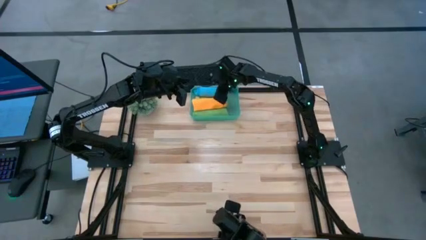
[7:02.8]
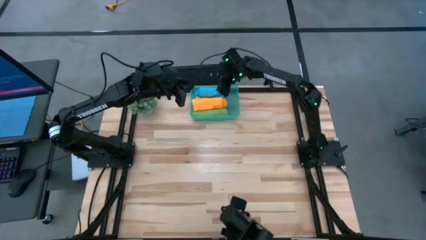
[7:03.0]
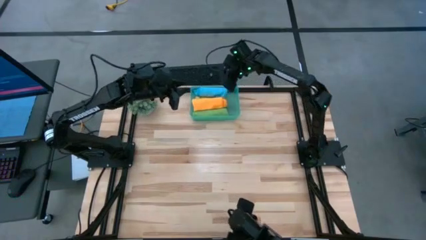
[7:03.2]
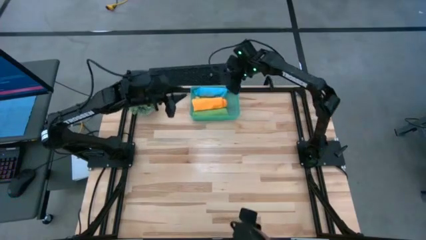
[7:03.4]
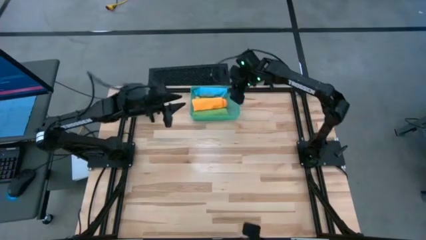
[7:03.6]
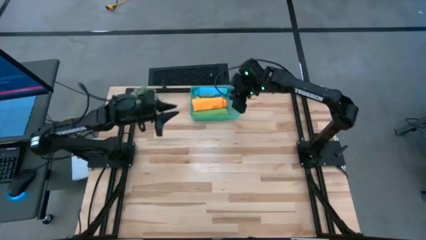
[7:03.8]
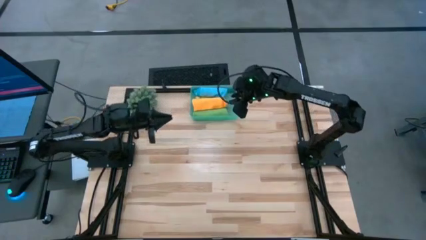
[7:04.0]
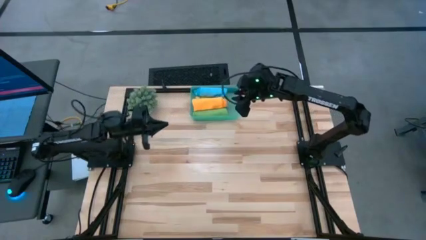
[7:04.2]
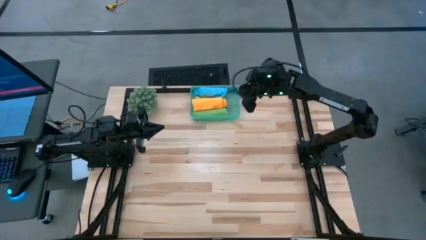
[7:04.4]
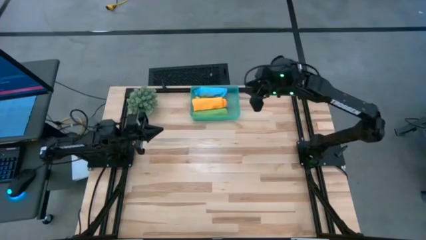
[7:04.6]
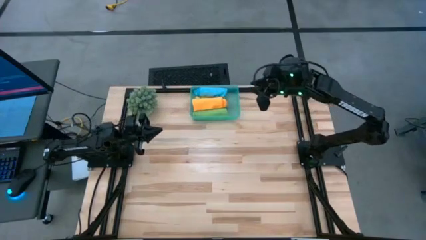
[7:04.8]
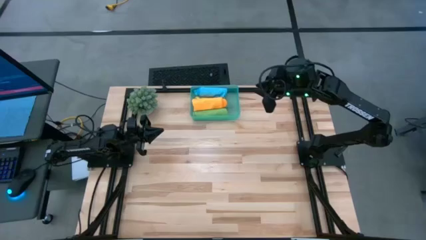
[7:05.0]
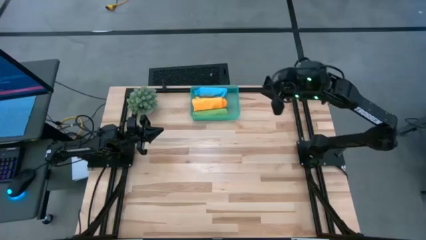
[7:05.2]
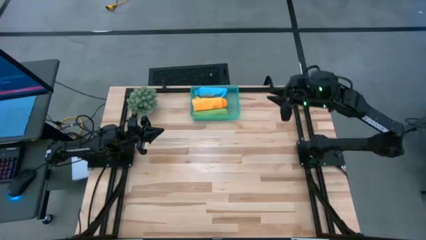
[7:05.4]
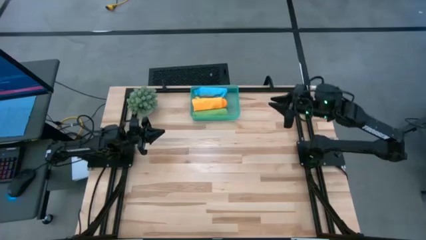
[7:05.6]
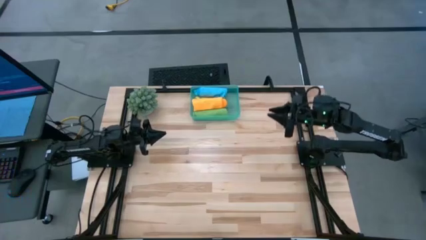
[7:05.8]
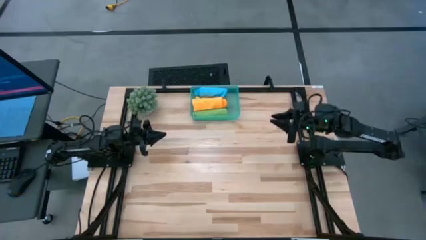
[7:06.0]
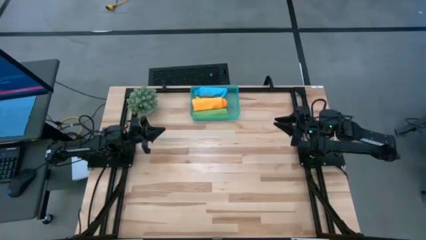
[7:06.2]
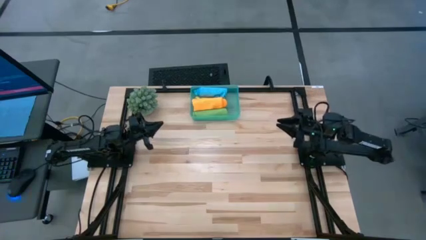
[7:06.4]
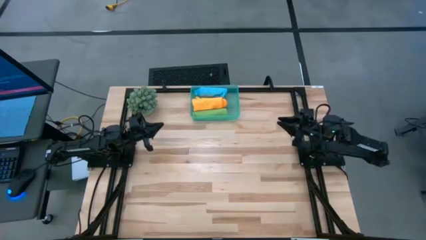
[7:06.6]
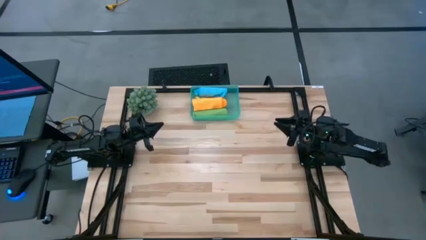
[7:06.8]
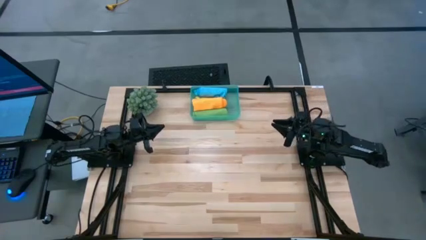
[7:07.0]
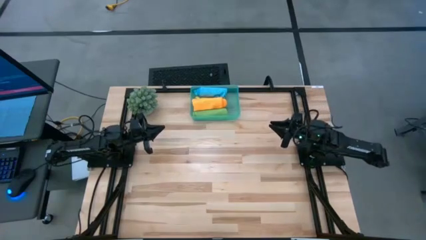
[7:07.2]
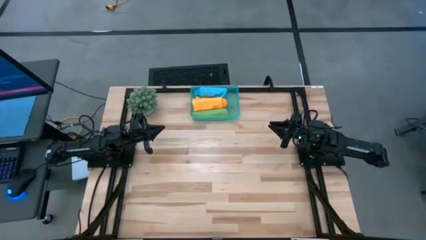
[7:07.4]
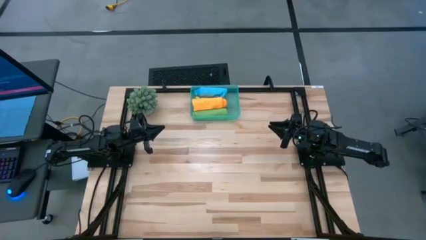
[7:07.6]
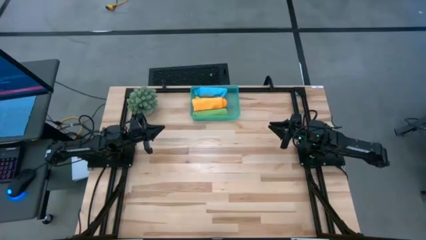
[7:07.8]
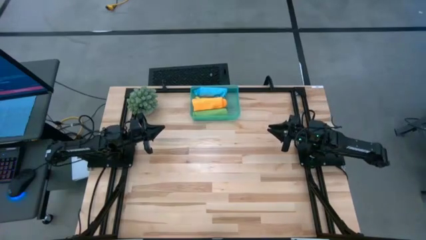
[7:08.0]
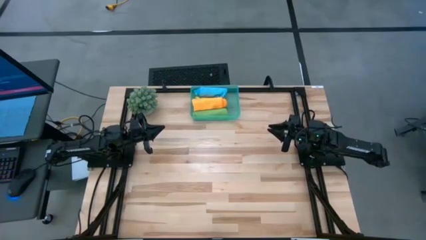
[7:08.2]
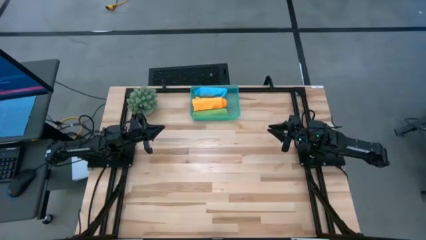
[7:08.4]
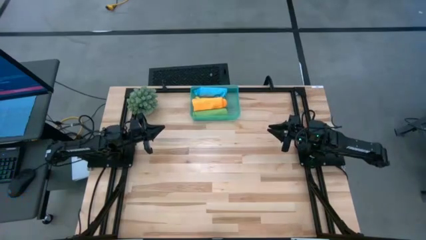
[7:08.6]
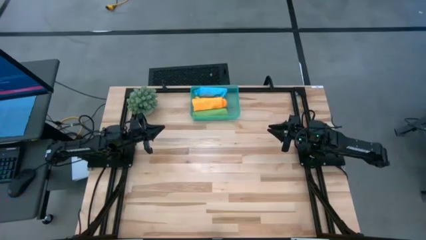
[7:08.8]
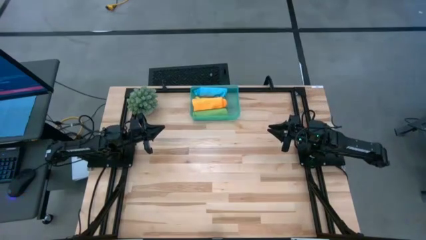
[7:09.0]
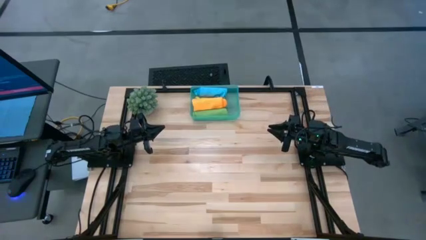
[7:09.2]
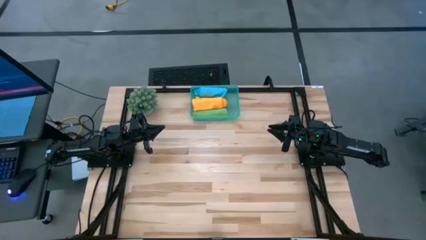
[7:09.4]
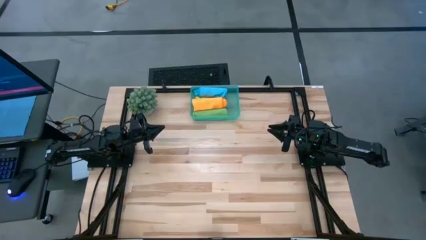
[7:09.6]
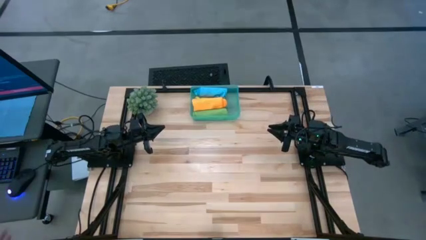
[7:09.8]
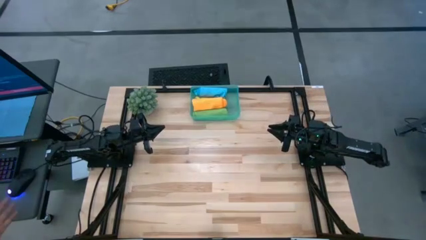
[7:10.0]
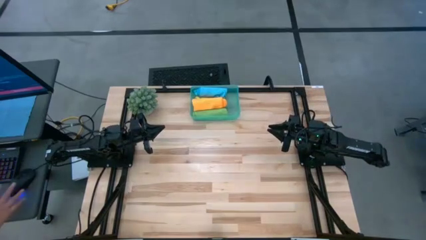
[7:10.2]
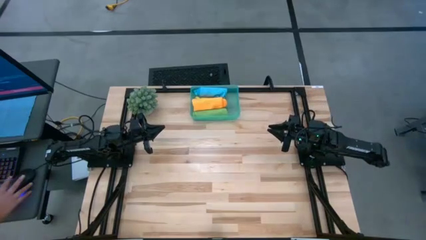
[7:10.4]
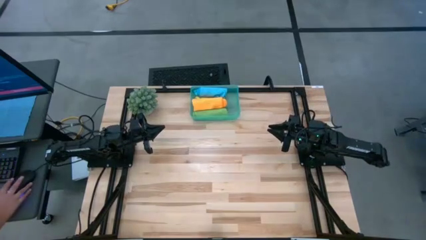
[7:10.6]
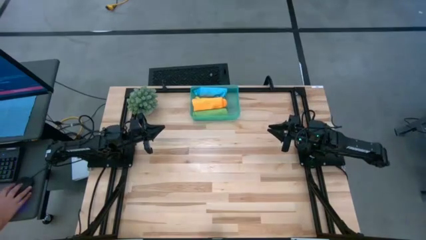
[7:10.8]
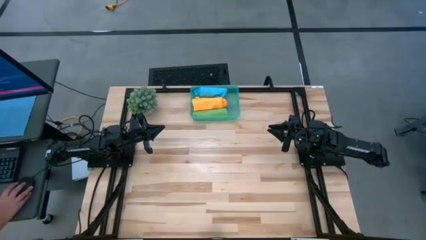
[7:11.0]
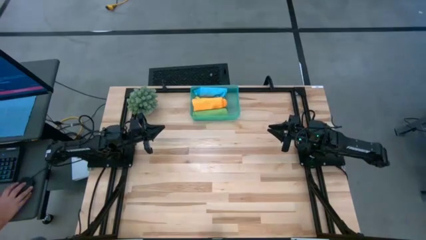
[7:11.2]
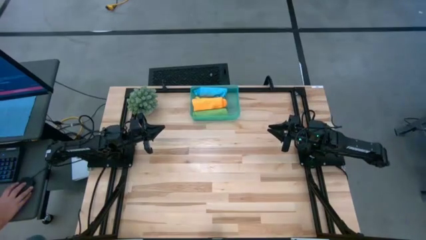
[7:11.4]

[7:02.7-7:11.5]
Task: Roll microfiber towels into tight, uniform cylinder then place into a basket
Return to Home Position

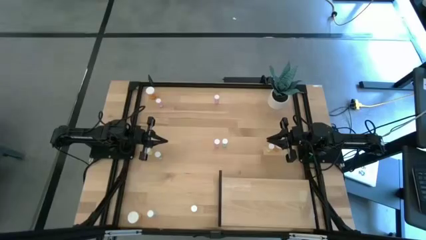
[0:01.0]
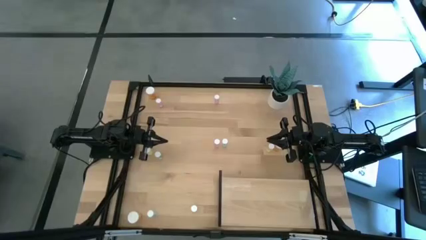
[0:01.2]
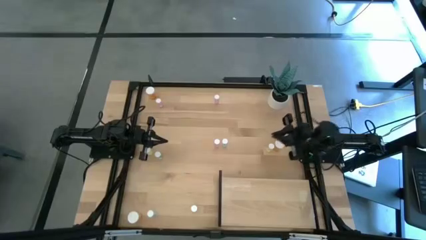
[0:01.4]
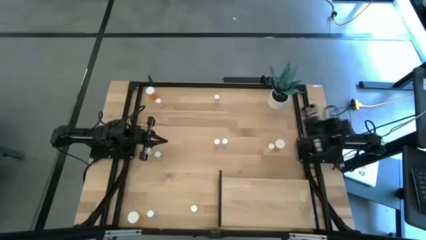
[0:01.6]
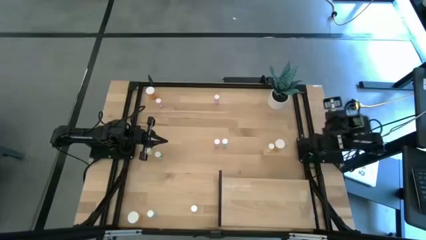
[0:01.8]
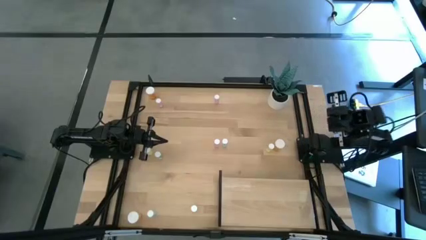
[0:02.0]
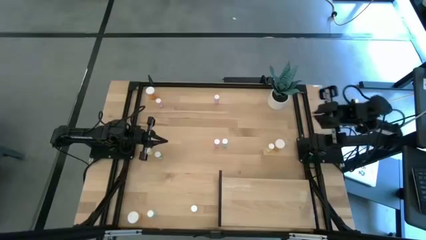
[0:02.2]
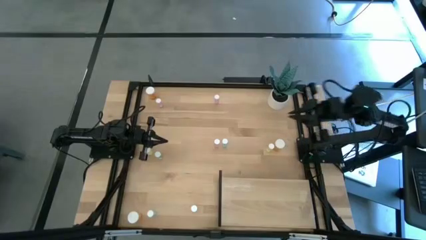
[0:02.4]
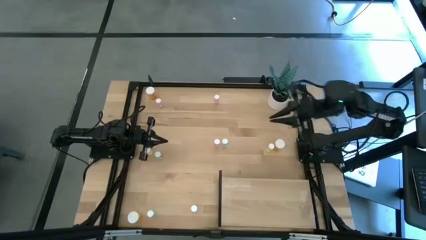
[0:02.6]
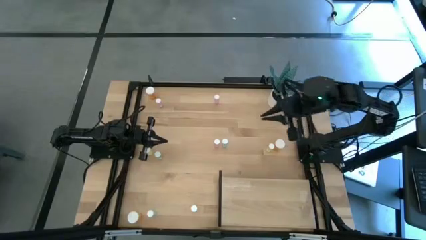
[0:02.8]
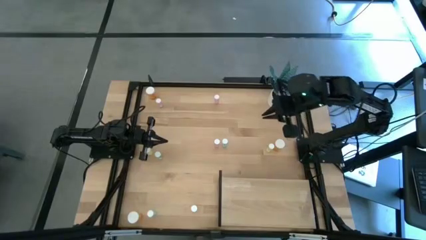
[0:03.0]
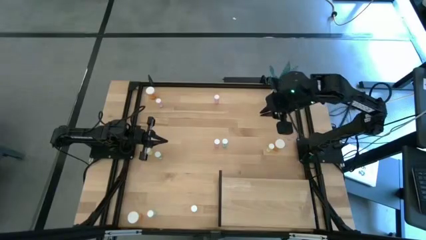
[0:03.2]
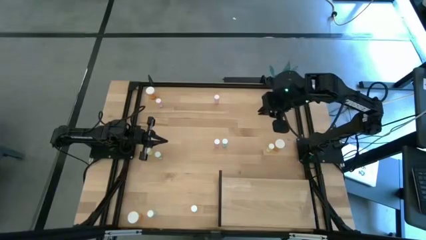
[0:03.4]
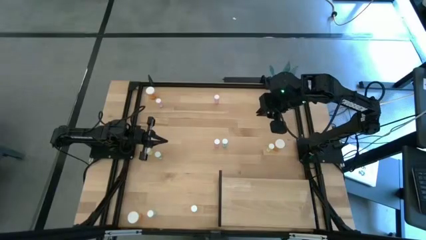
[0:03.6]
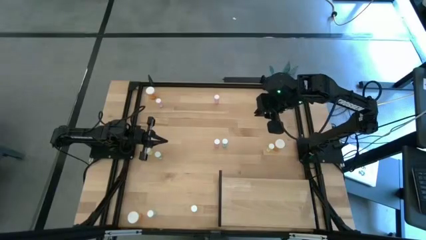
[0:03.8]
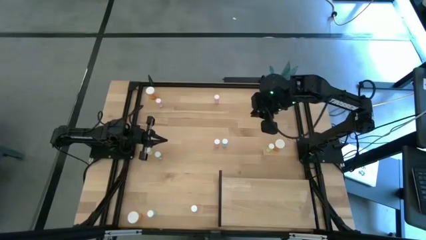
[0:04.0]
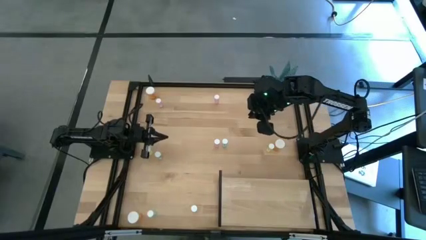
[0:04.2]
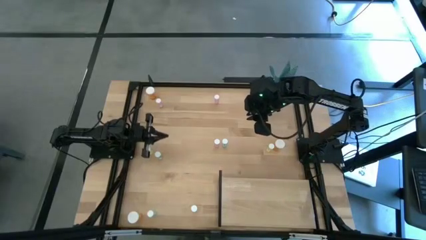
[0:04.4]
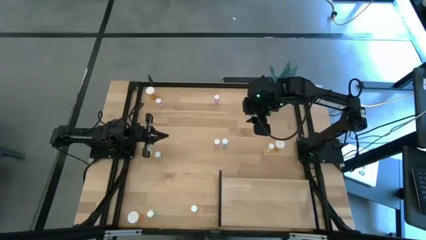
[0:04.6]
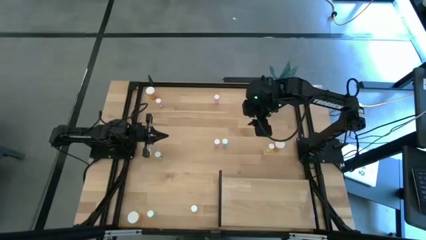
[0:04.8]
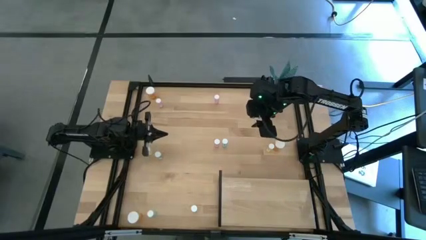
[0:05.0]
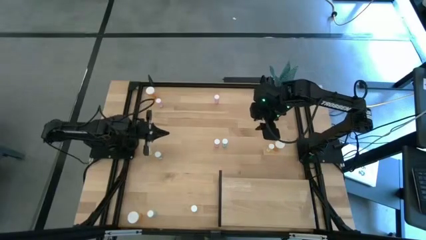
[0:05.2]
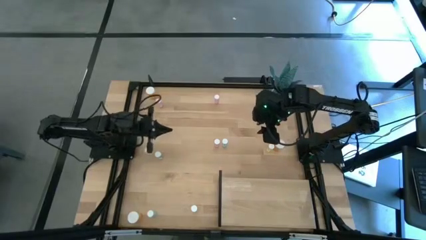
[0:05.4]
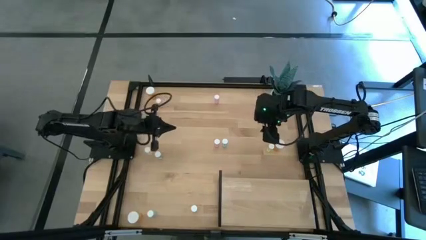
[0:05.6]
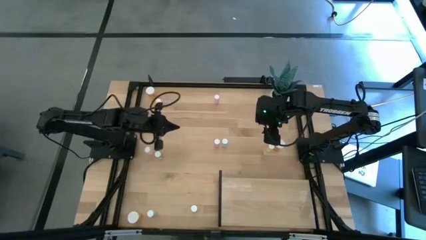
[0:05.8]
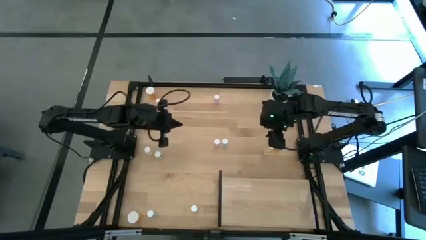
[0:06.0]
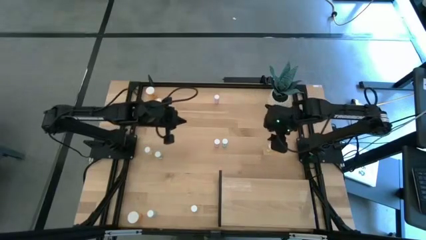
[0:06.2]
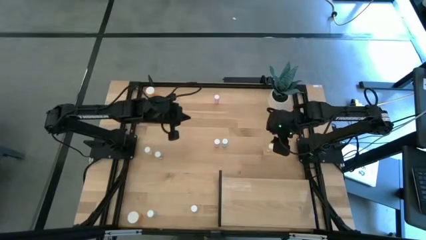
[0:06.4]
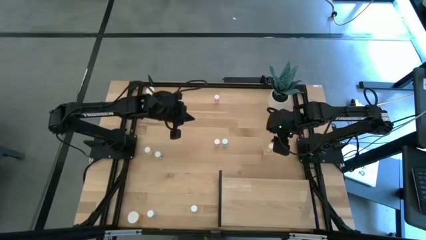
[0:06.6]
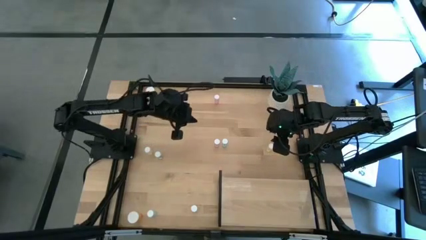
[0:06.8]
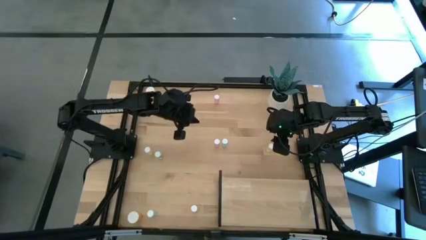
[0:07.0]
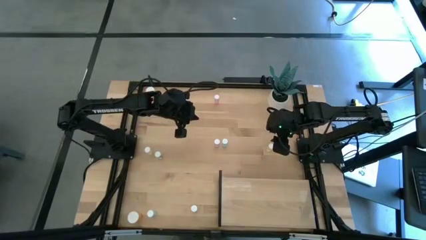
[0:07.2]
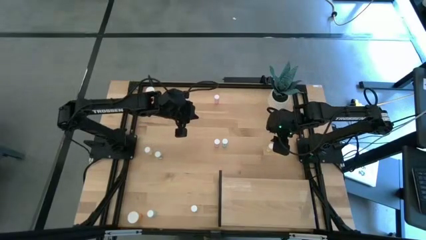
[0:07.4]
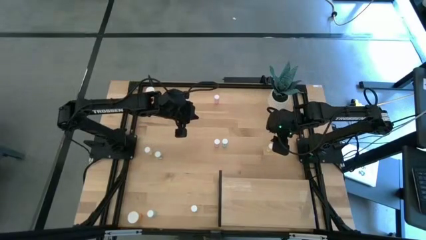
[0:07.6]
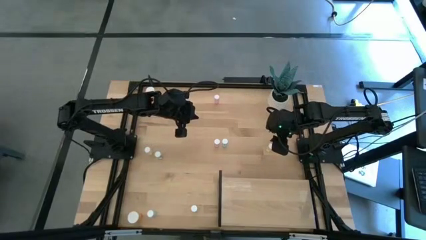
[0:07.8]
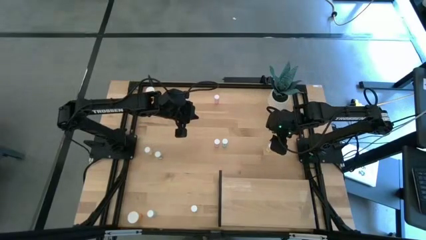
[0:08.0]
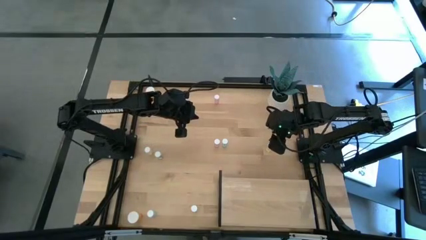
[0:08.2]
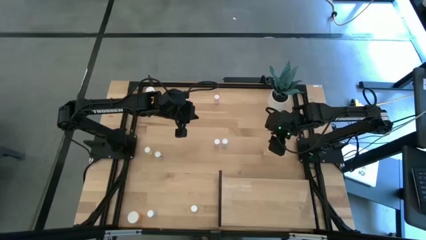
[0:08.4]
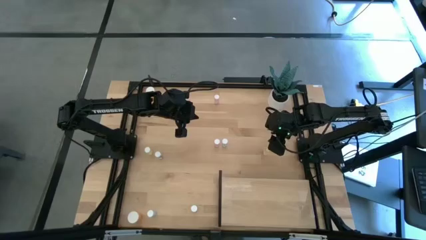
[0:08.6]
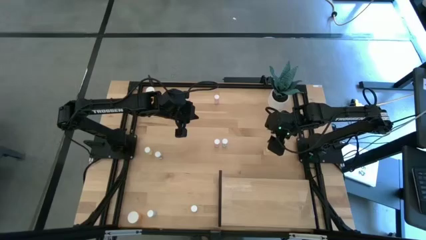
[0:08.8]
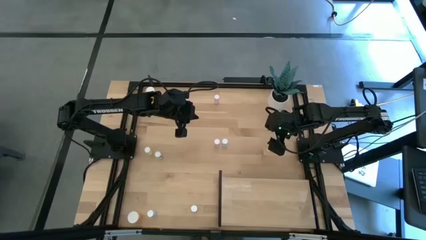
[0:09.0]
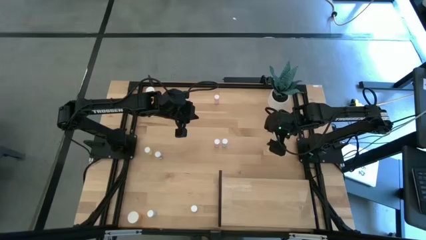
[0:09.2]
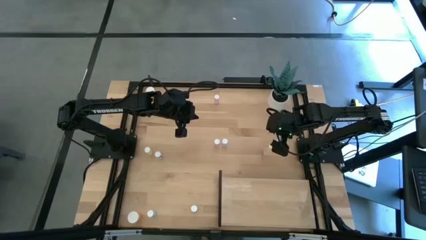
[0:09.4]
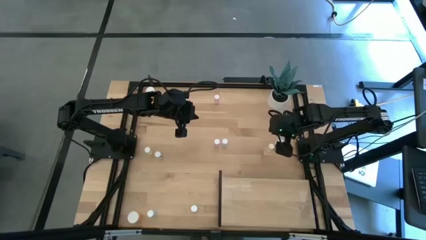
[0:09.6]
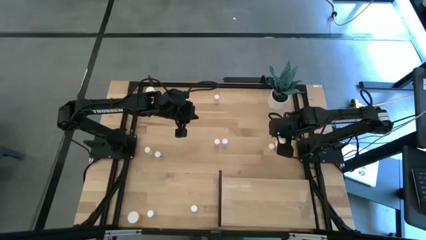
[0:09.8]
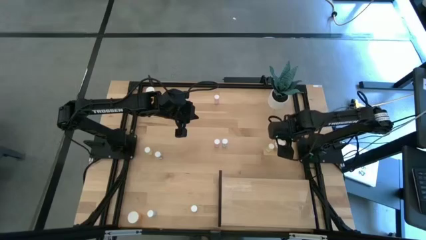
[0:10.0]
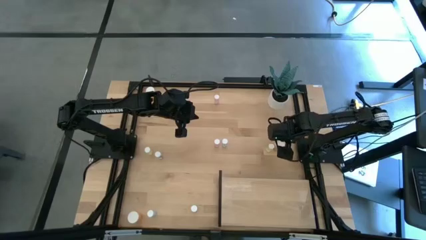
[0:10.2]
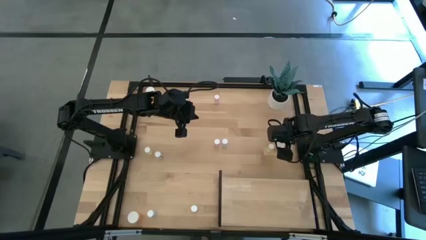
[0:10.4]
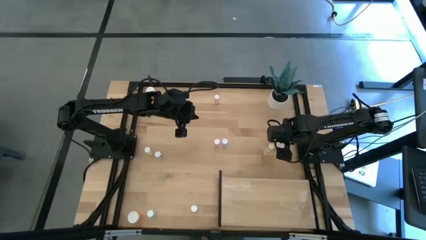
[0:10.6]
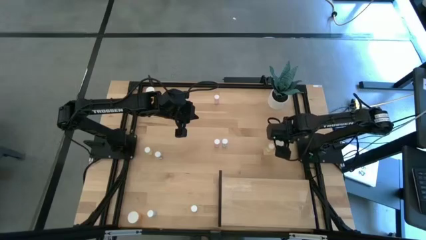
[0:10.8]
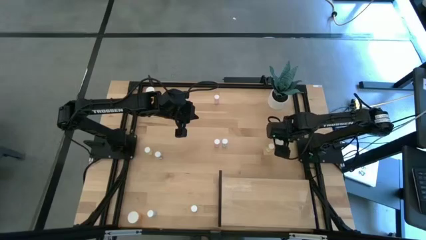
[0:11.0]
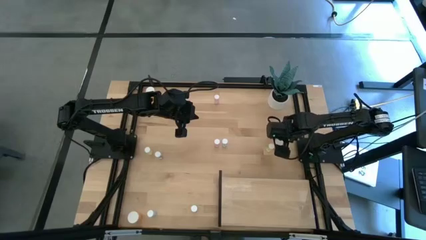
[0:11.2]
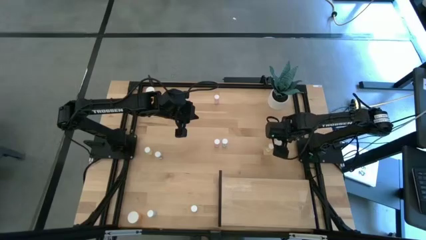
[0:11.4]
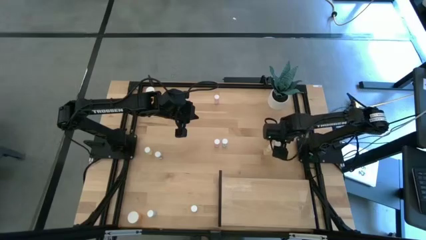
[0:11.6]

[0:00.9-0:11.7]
Task: Pick and place medicine bottles onto shelf by color
Put the middle right orange pill bottle on the shelf
